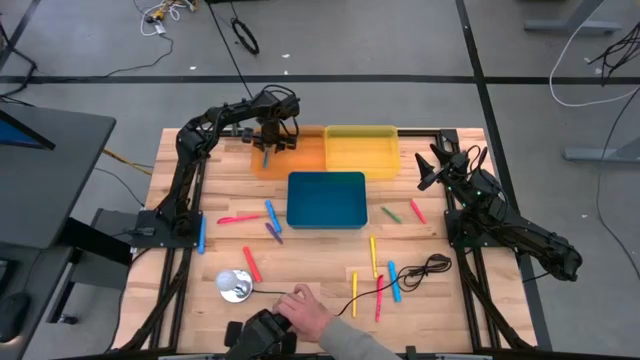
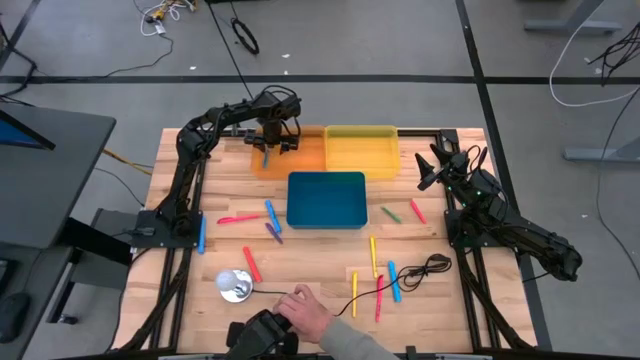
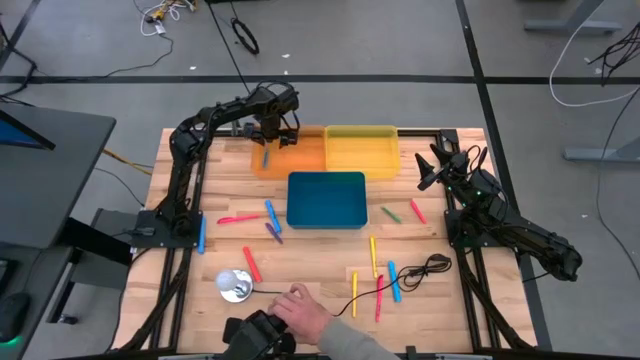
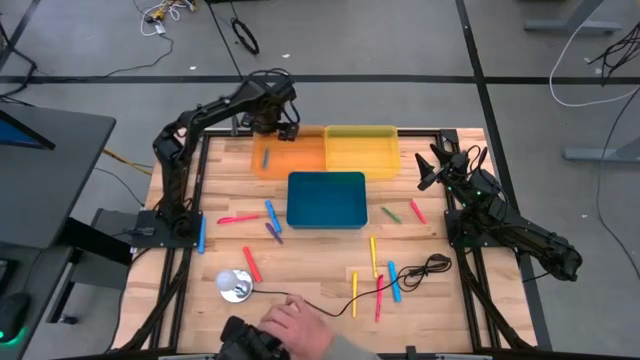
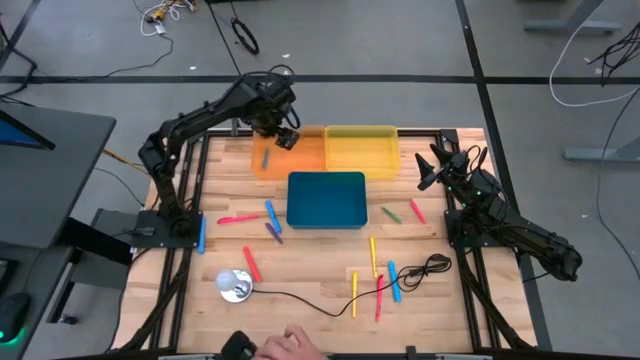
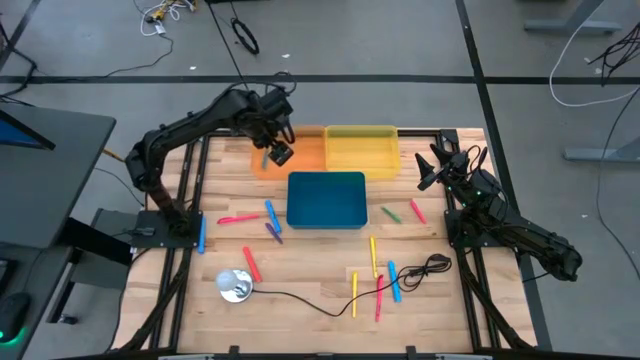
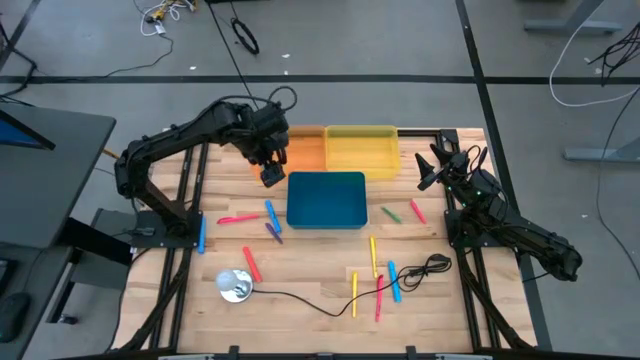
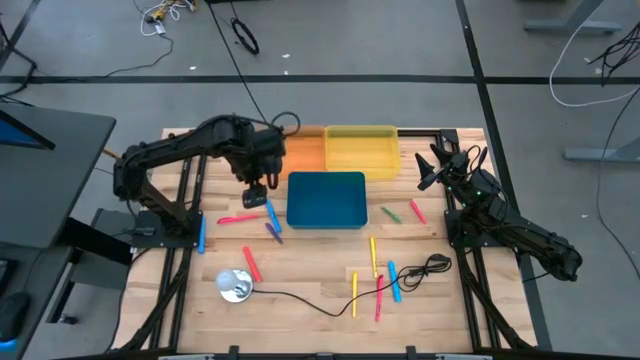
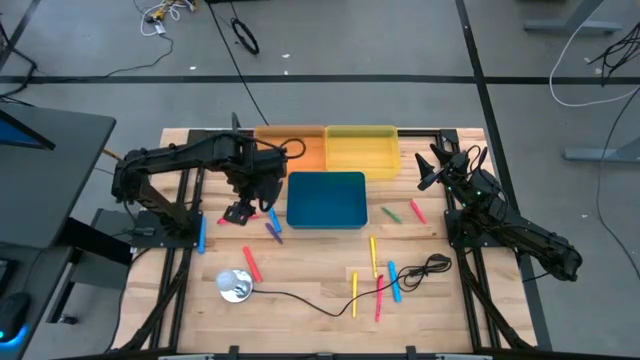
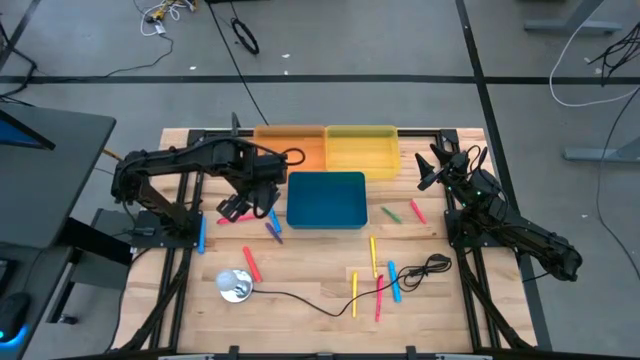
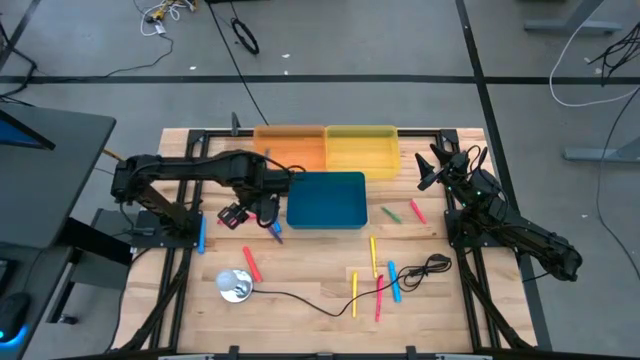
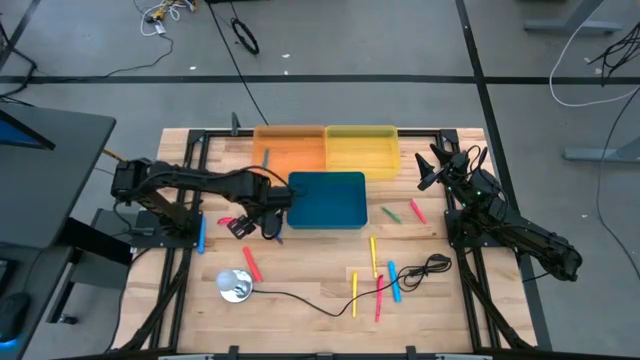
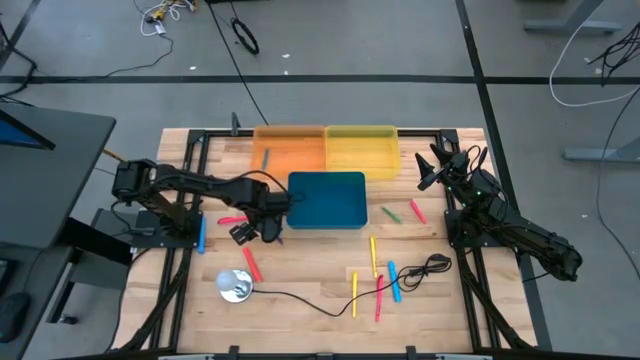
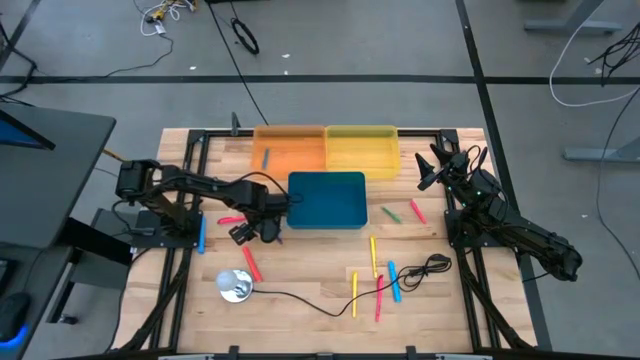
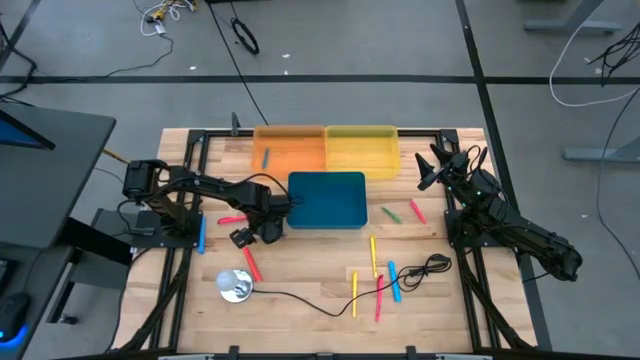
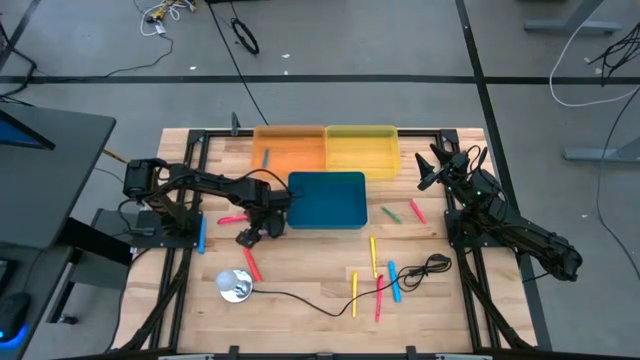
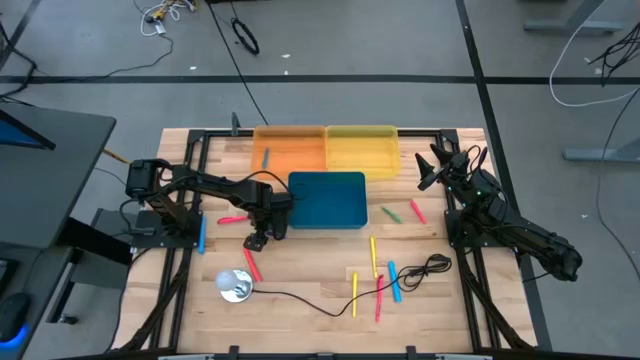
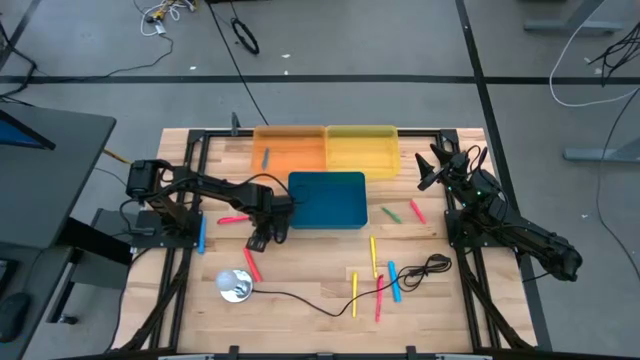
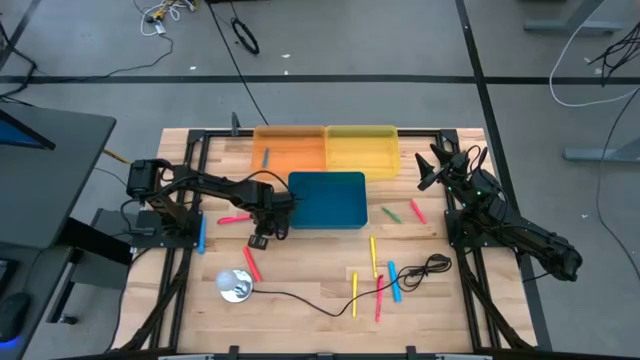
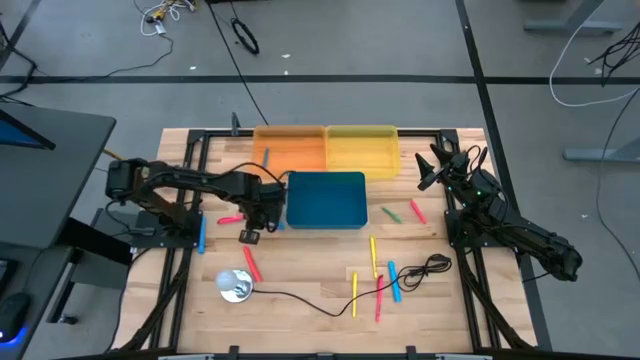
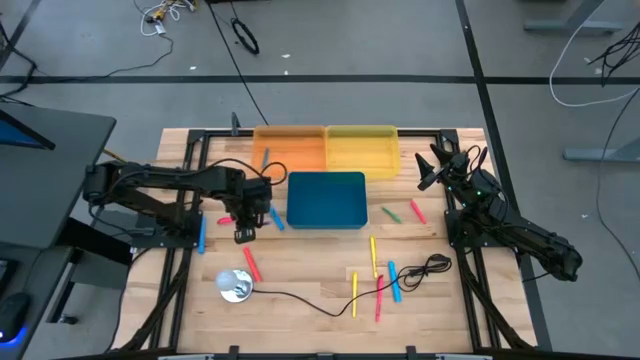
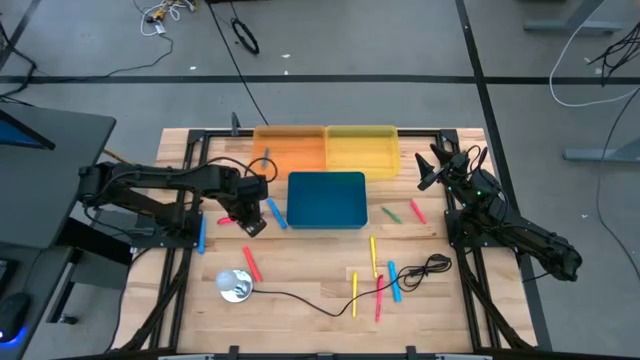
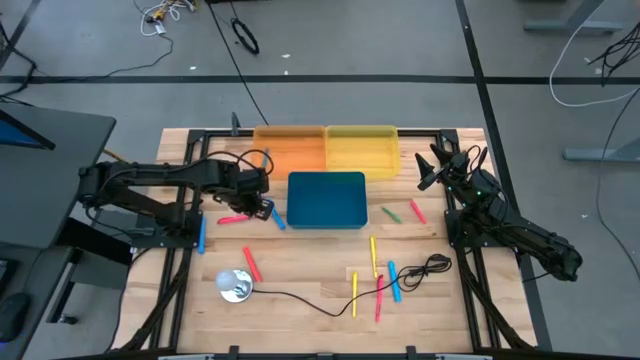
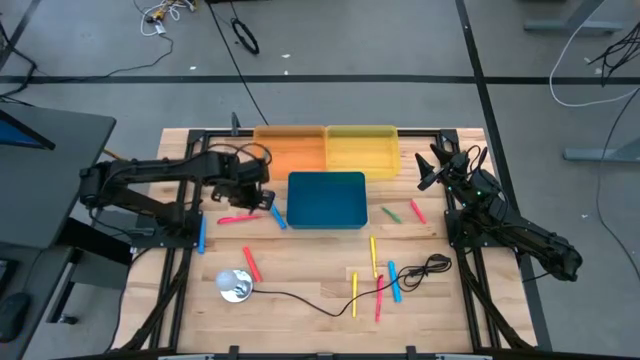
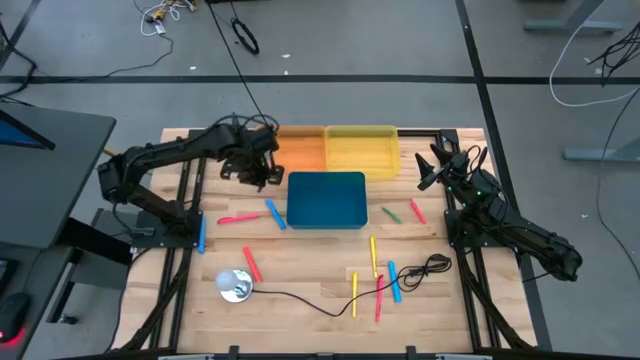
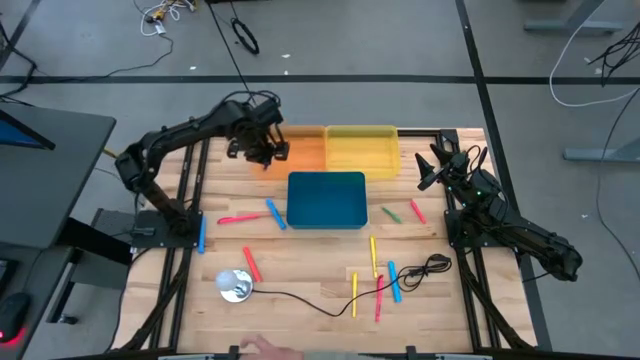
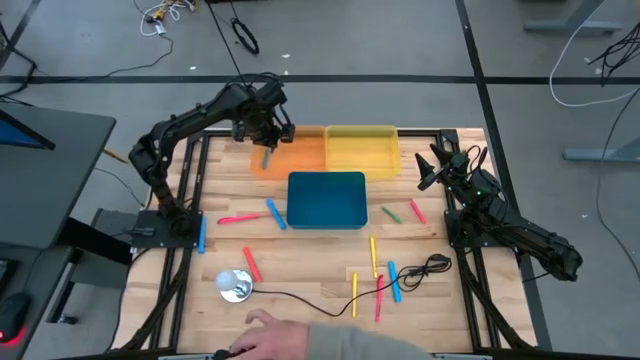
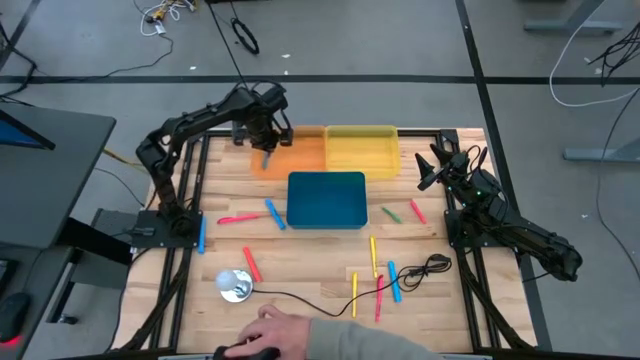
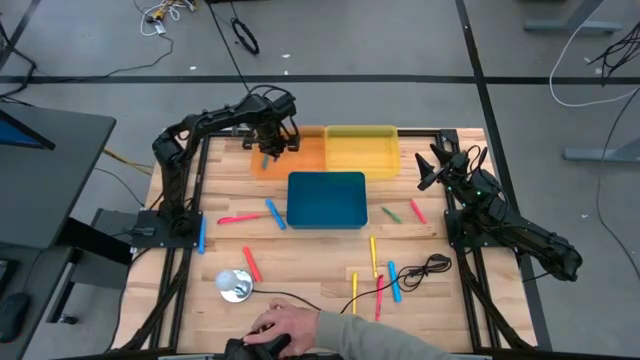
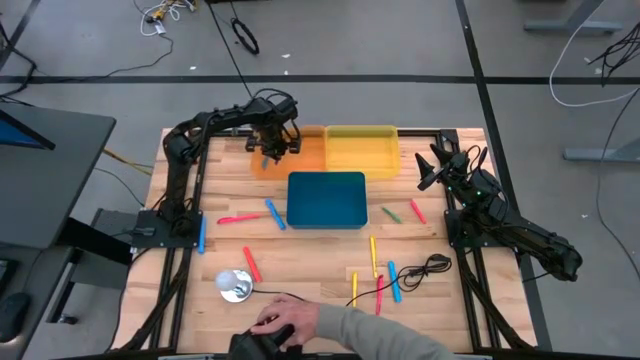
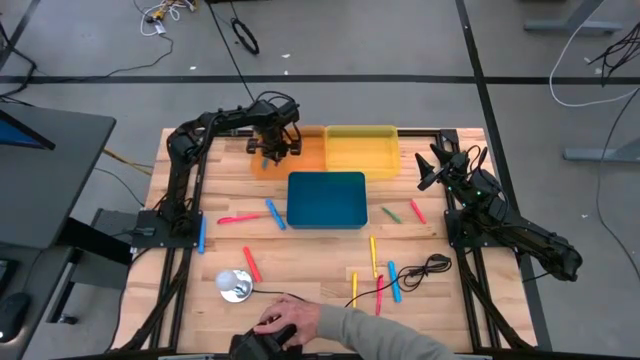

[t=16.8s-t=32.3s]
Task: Pick & Place Markers
Put the small purple highlighter into the orange transparent bin

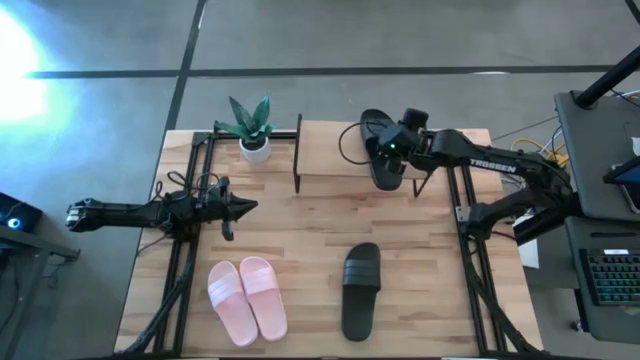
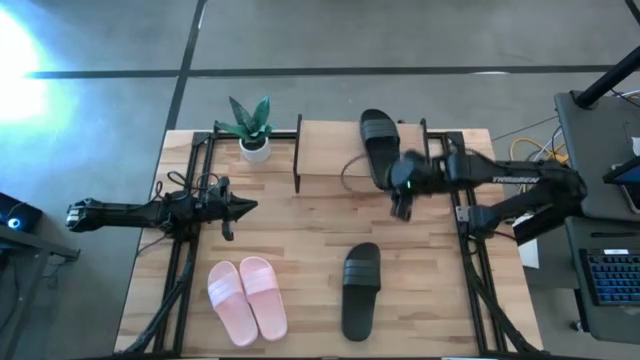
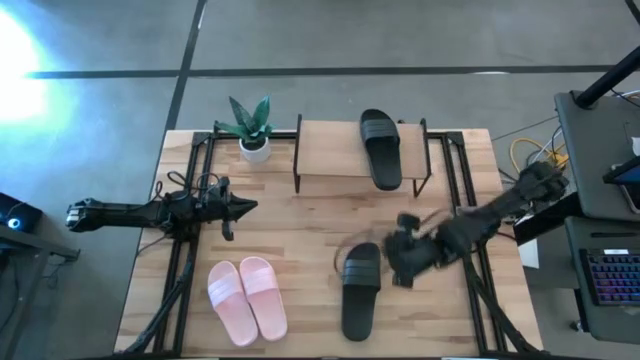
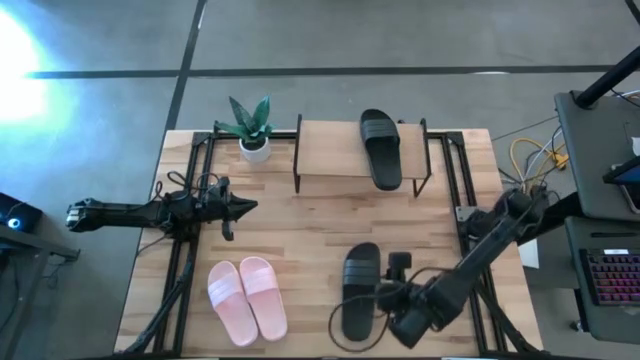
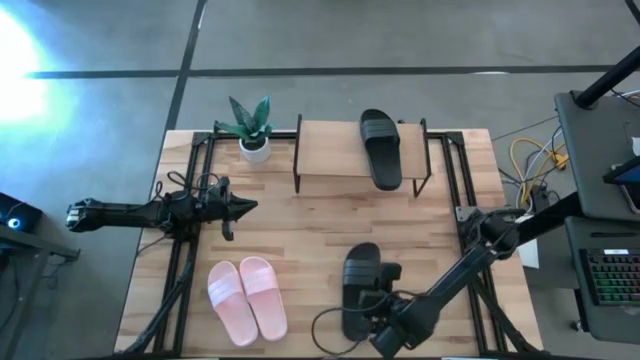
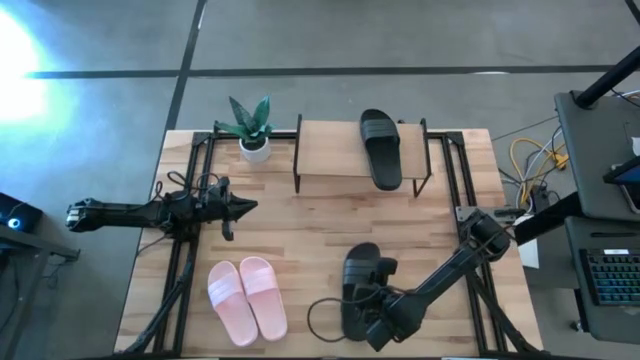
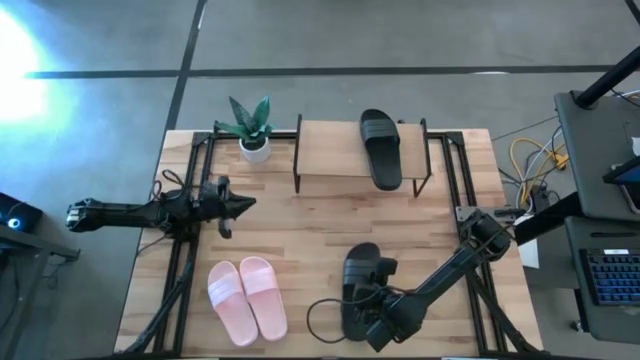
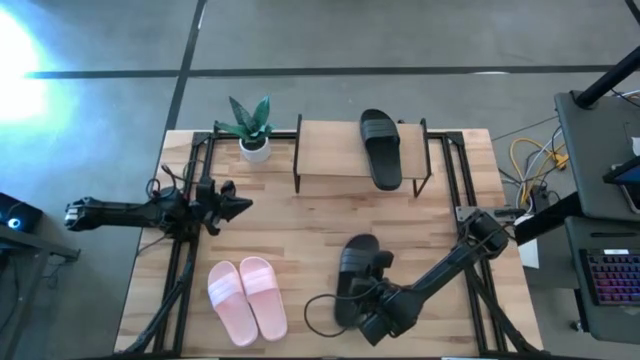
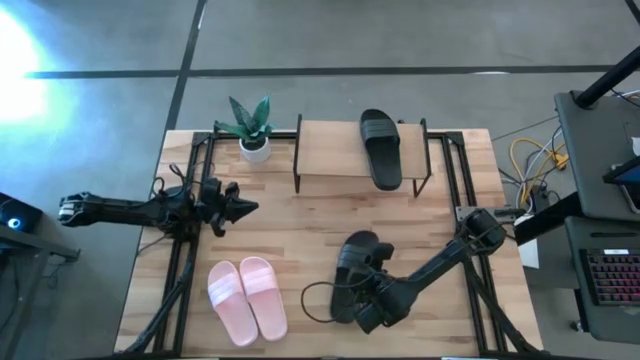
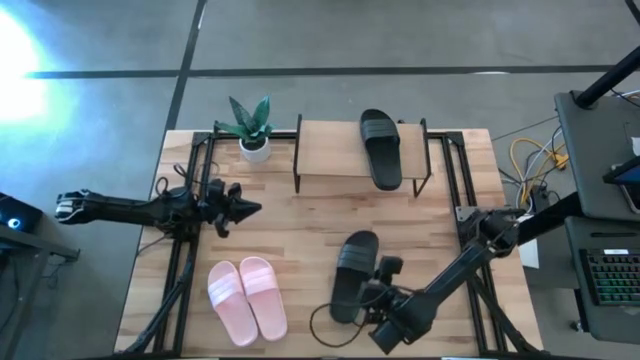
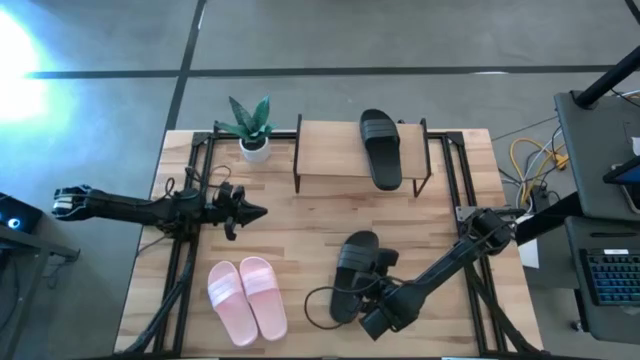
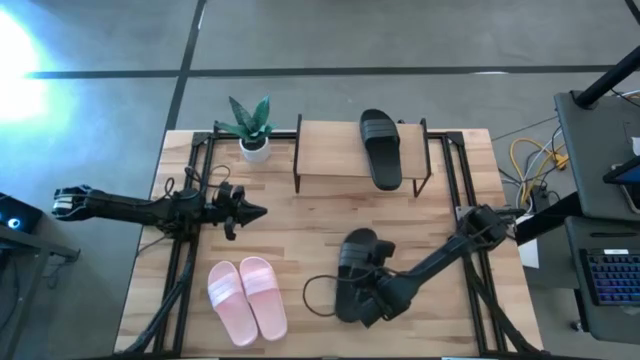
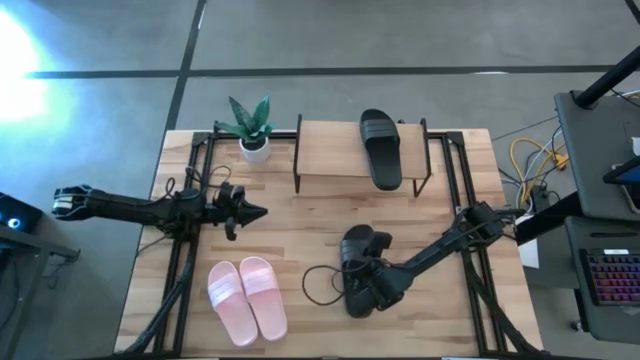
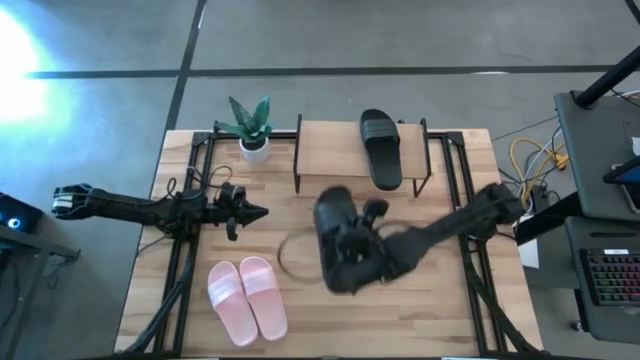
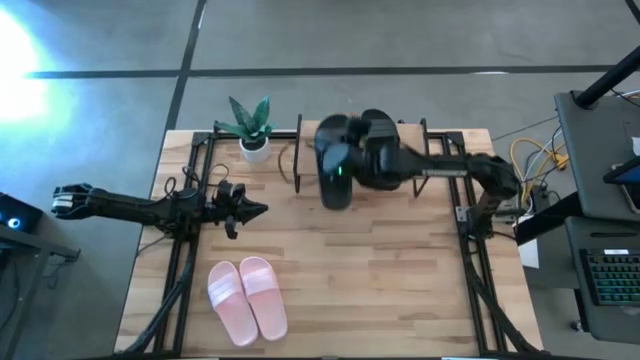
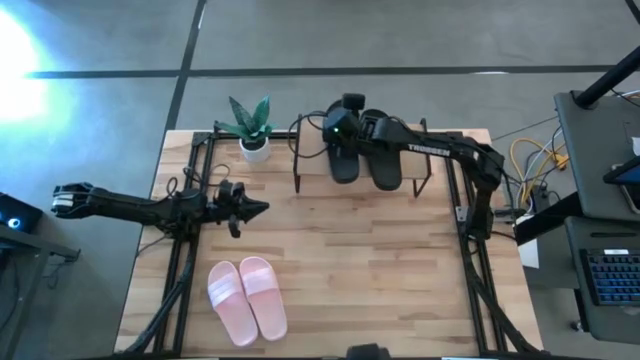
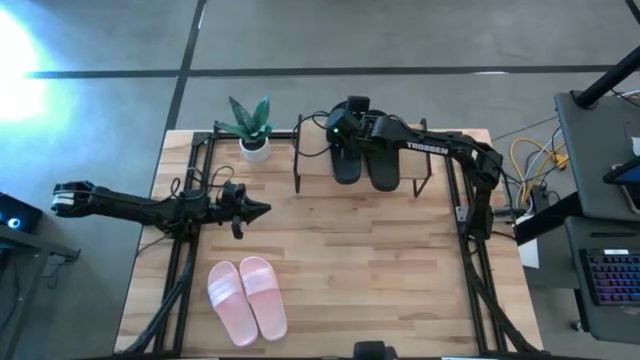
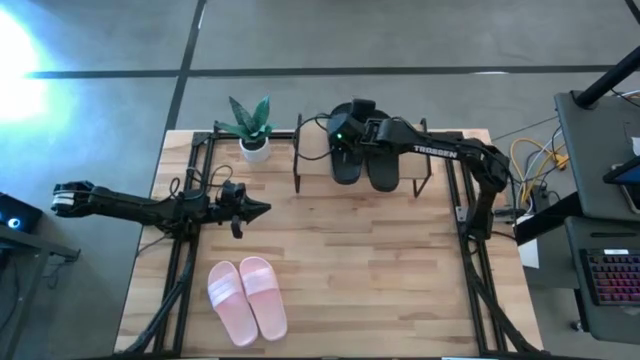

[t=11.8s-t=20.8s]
Task: Pick and place slides into the shelf
Put the black slipper on the shelf
